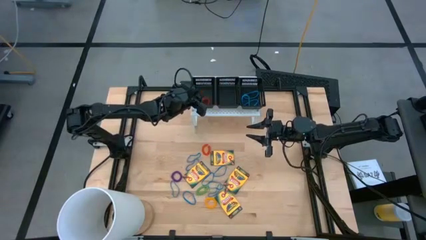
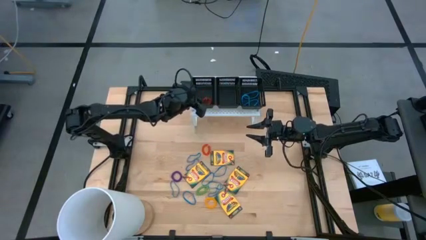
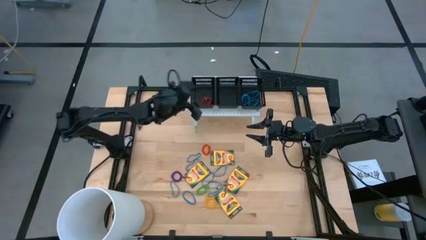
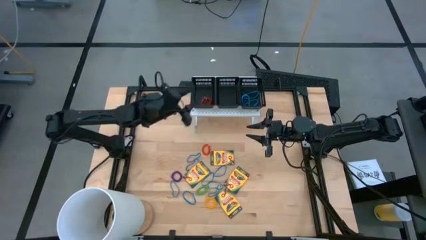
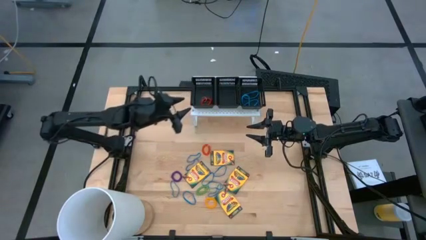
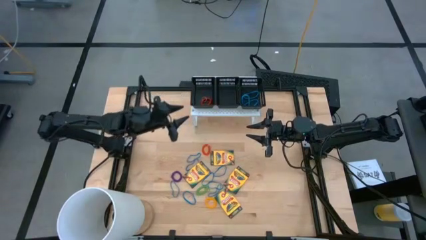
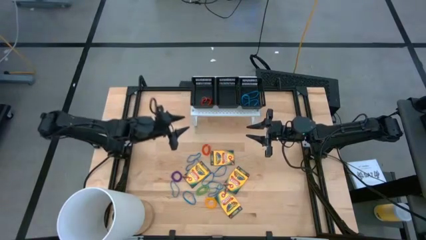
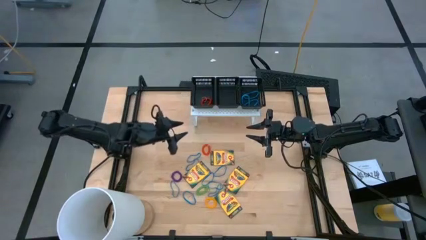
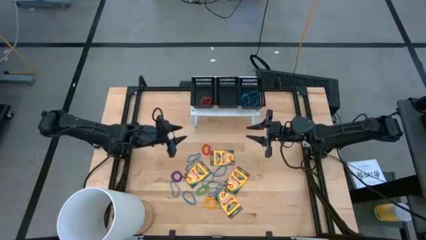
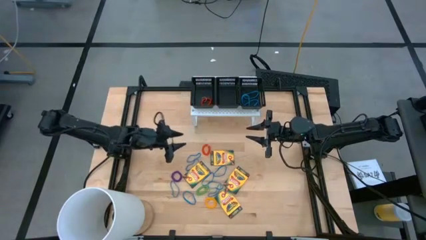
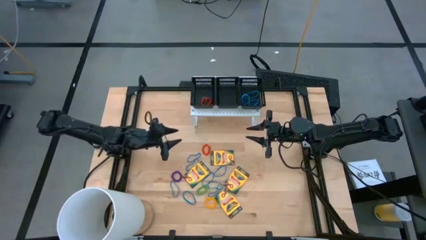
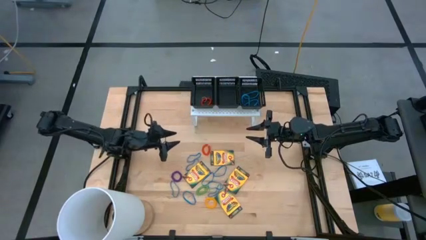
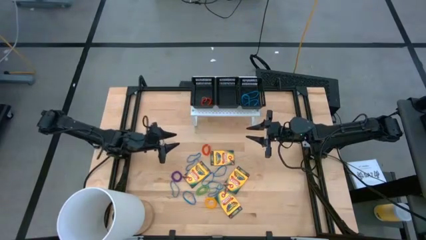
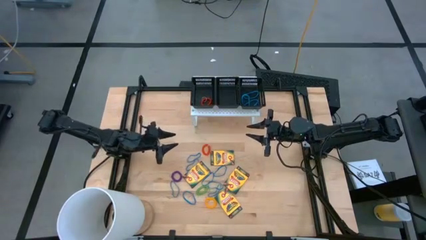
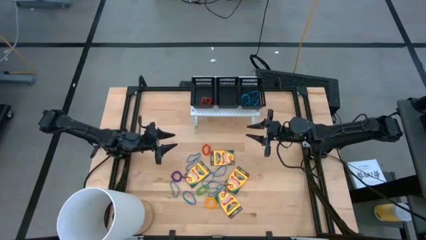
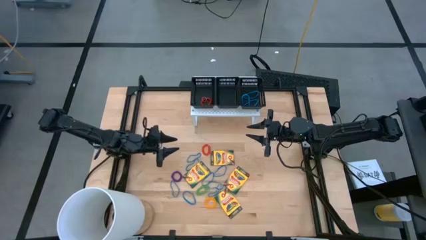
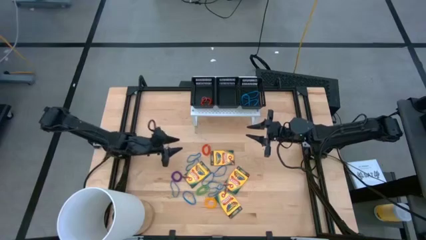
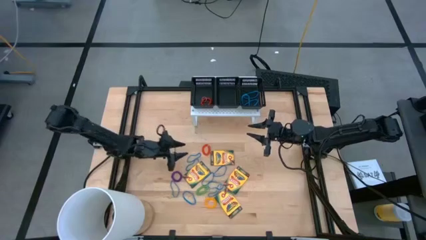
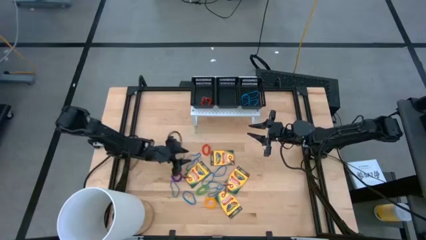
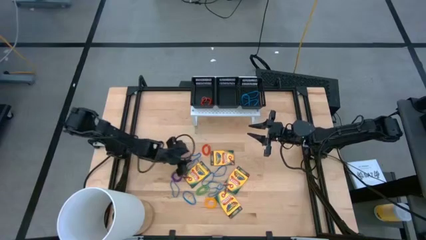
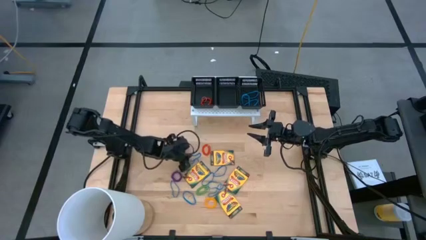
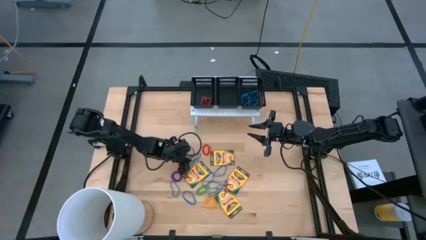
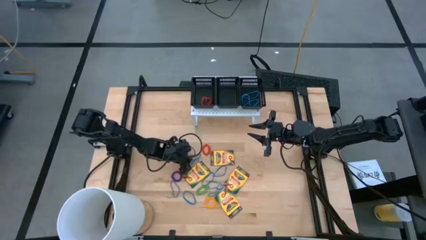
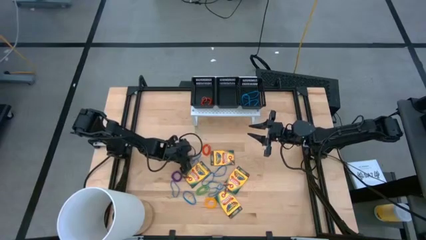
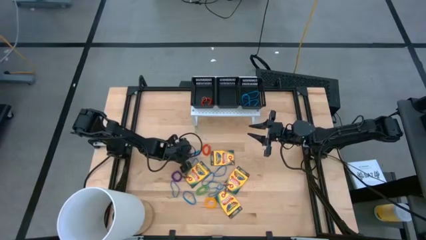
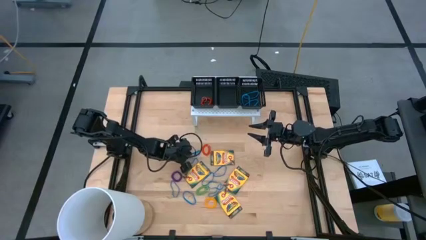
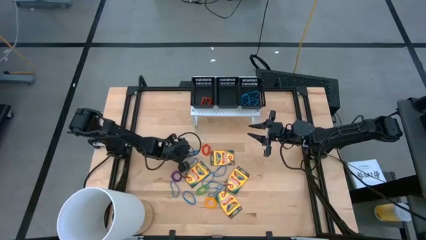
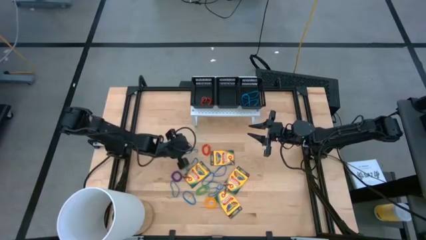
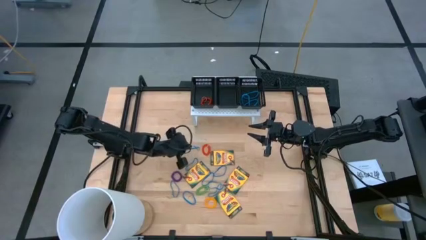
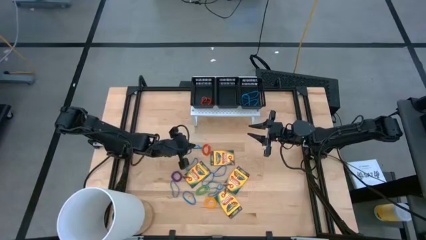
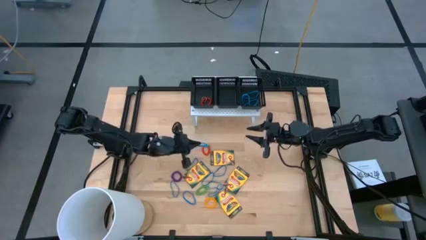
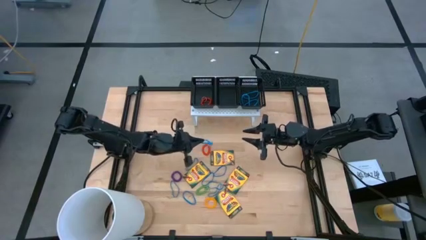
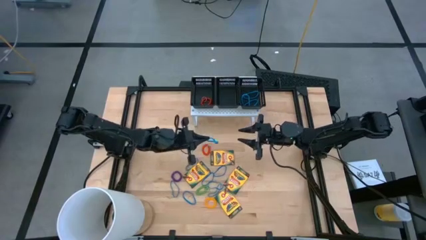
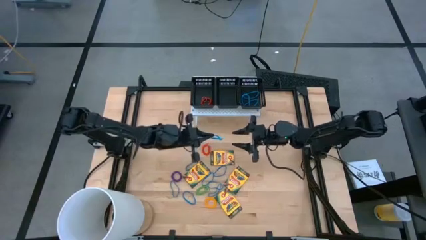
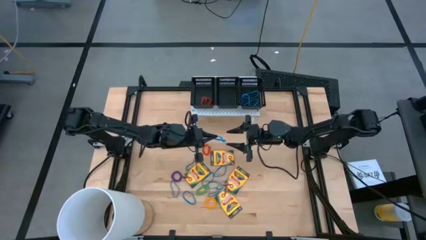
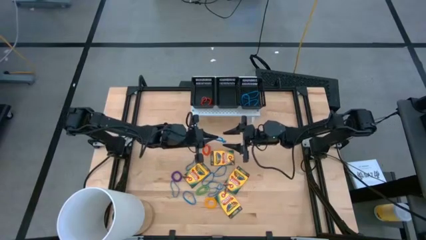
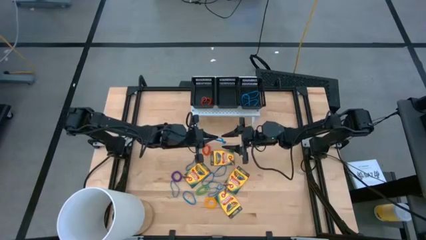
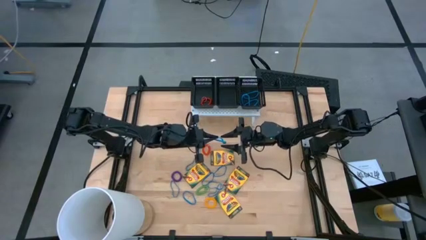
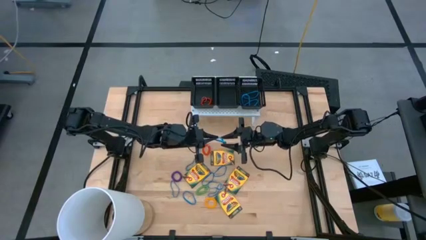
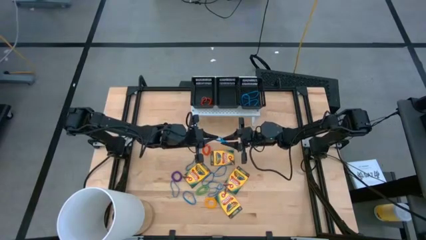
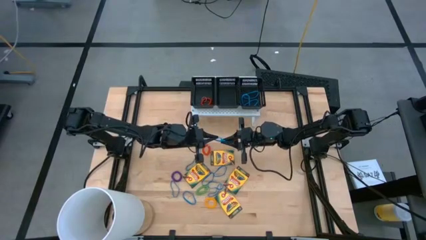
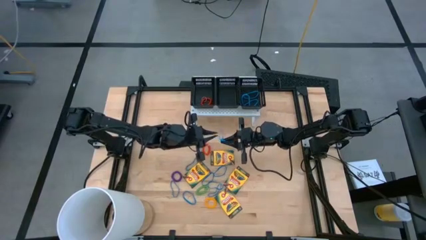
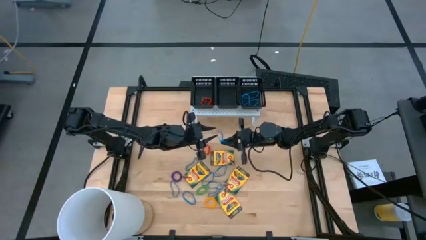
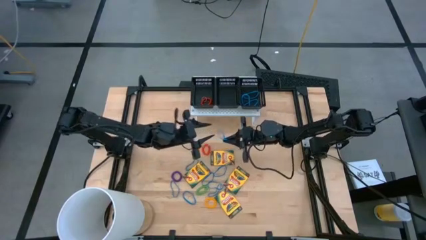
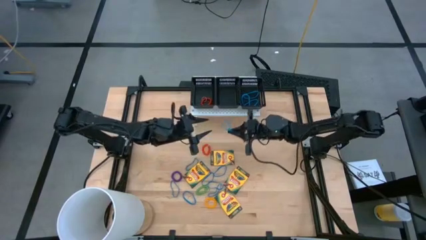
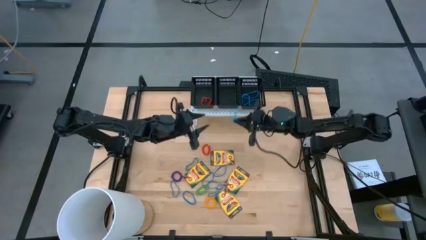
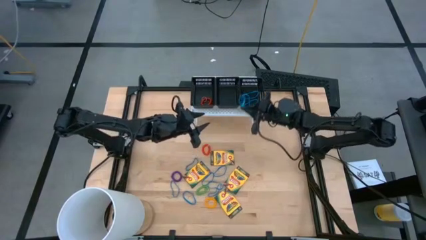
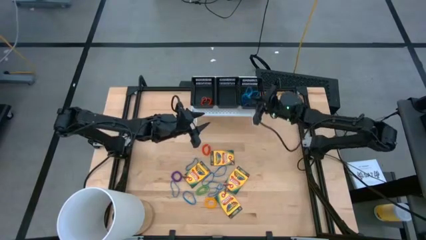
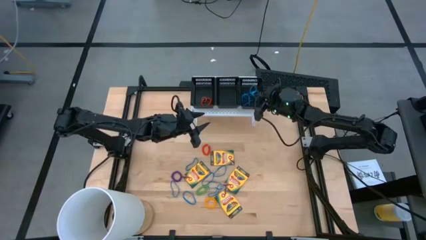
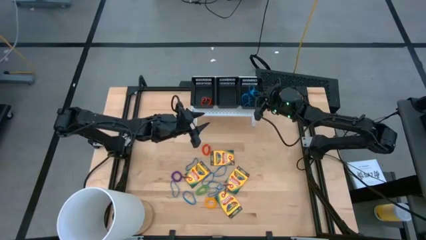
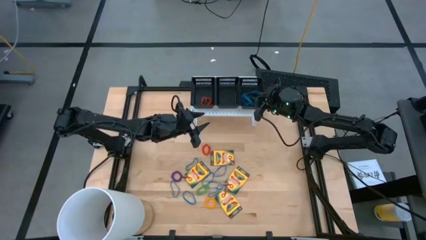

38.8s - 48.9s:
Task: Pick & Place Office Desk Supplies
Put the blue rubber band into the right black bin on the shelf

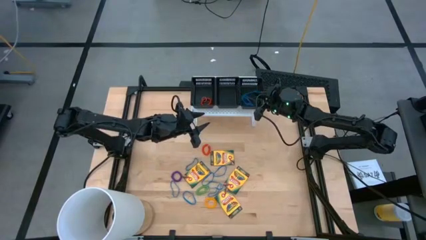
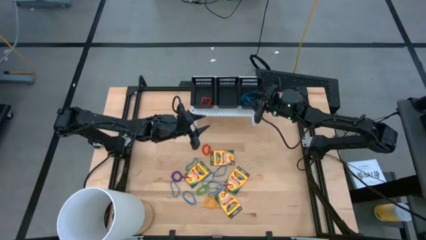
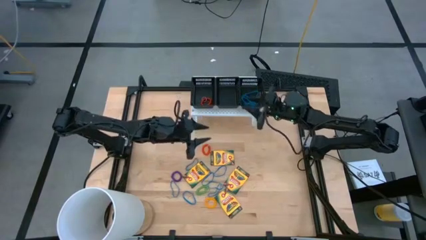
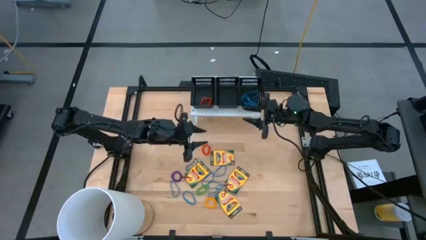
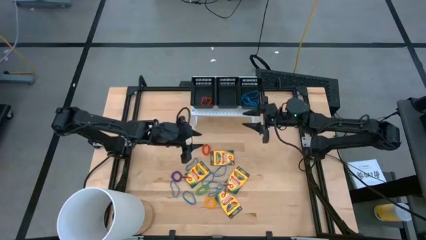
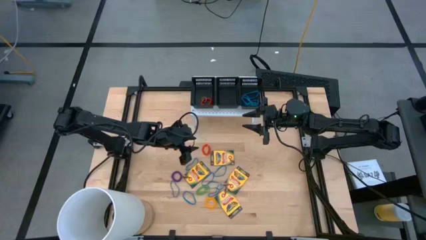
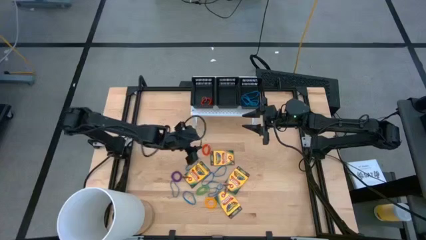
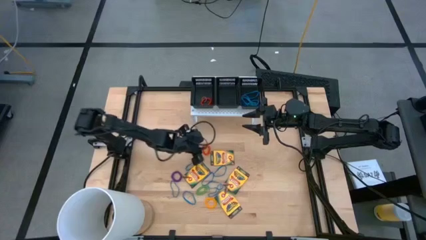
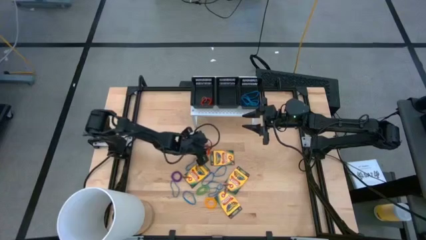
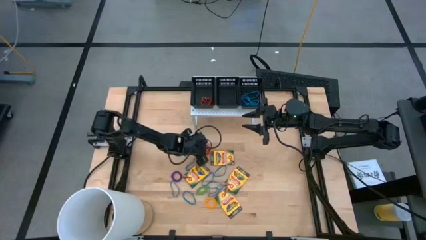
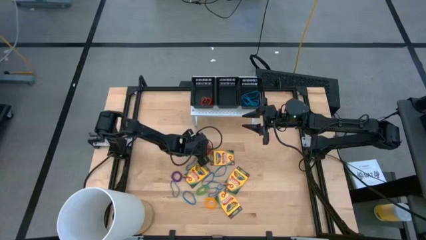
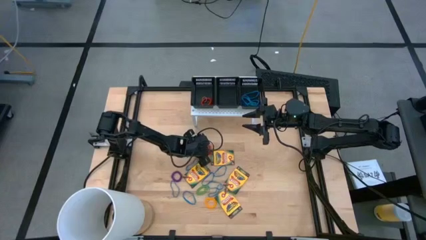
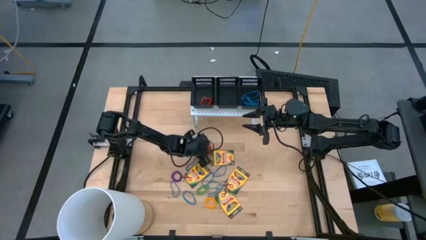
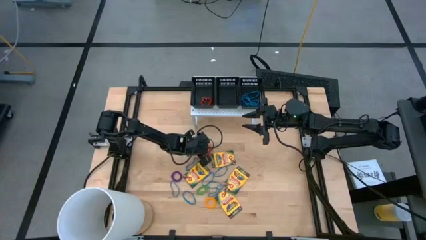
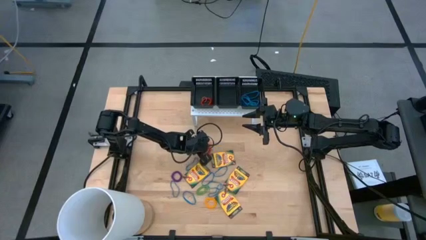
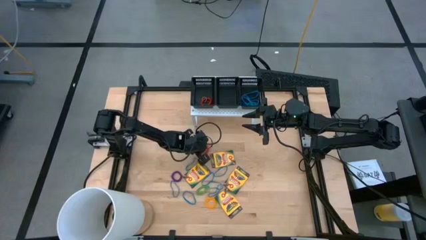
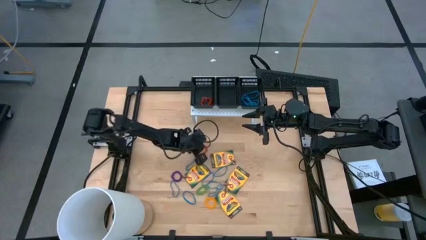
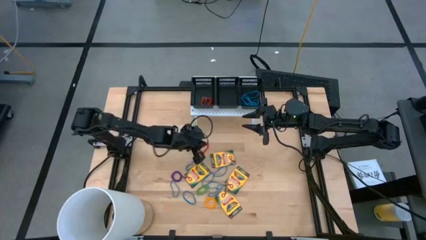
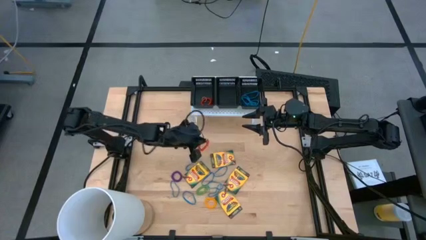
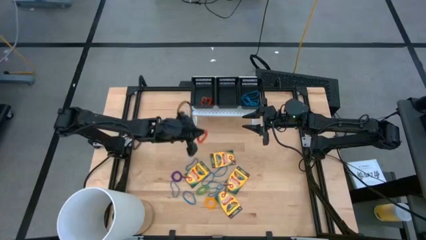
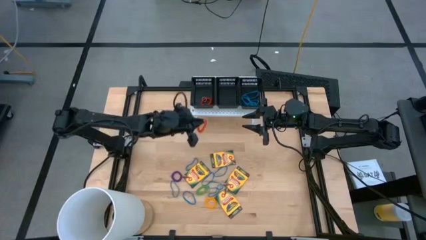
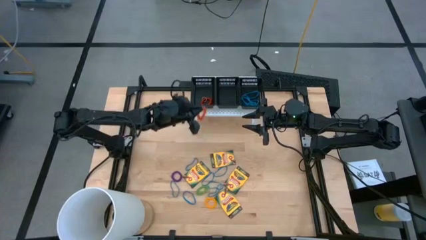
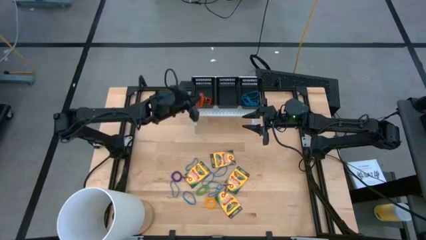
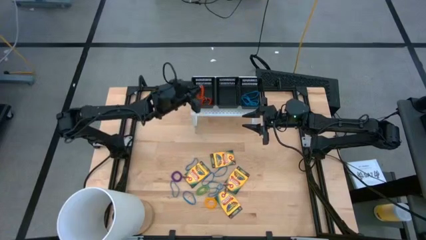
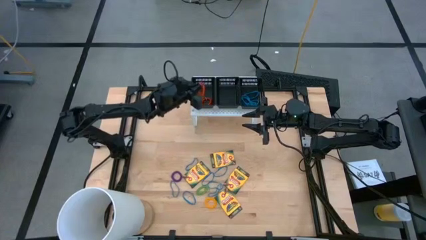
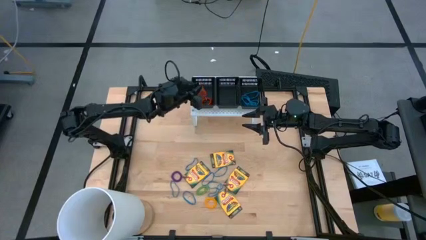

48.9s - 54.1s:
Put the orange spring keychain into the left black bin on the shelf

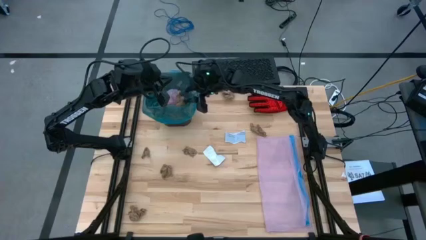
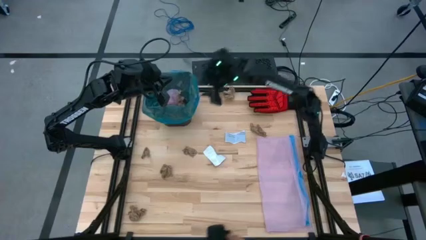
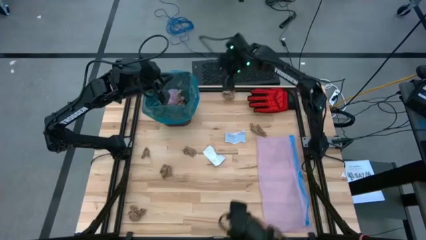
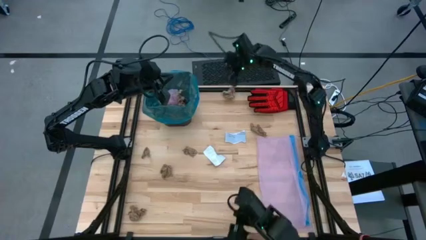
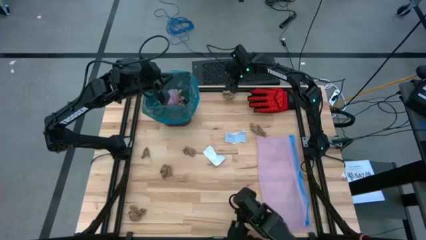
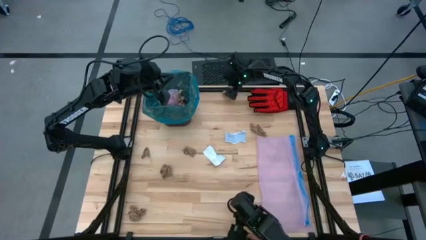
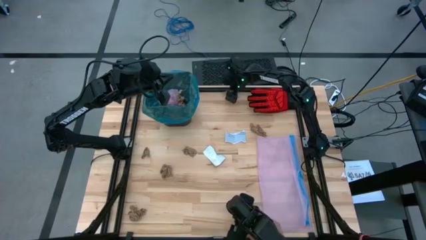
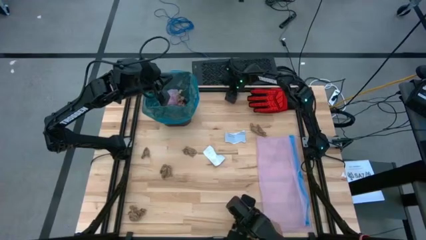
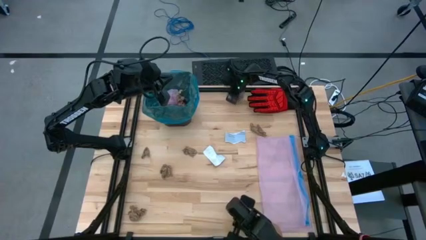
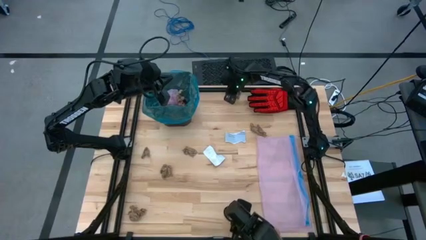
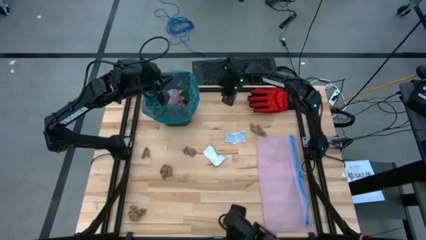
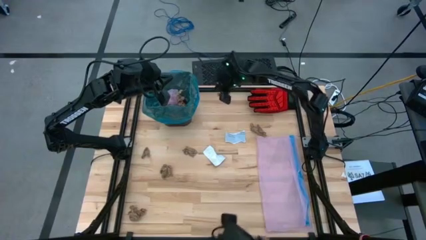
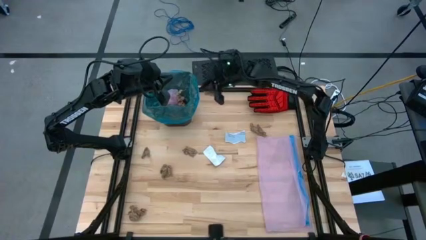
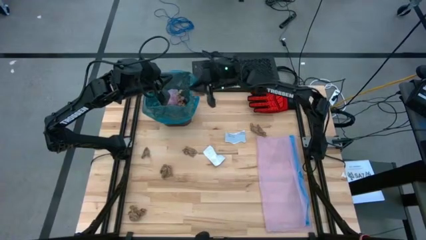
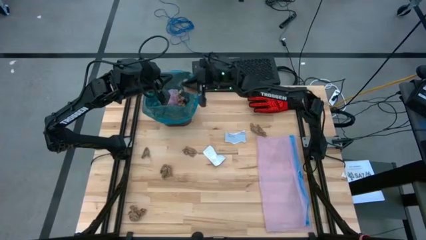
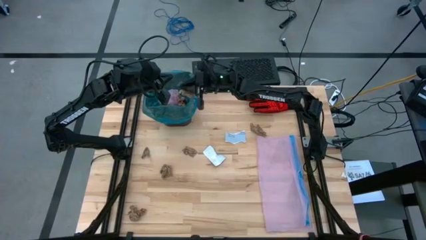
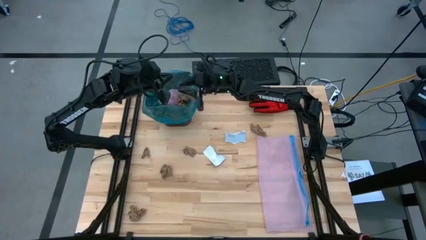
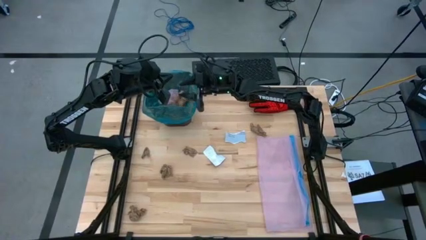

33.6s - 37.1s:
Task: place trash/remove bag and relplace
Put the brown napkin into the trash bin
